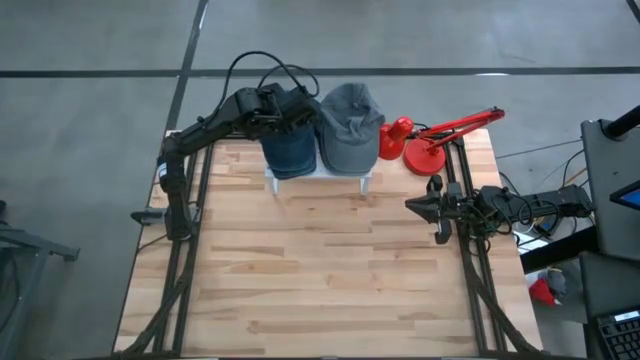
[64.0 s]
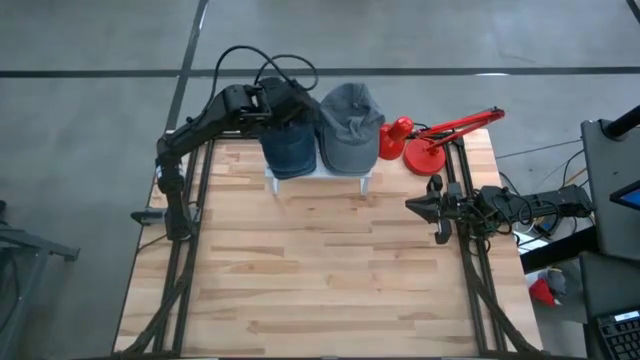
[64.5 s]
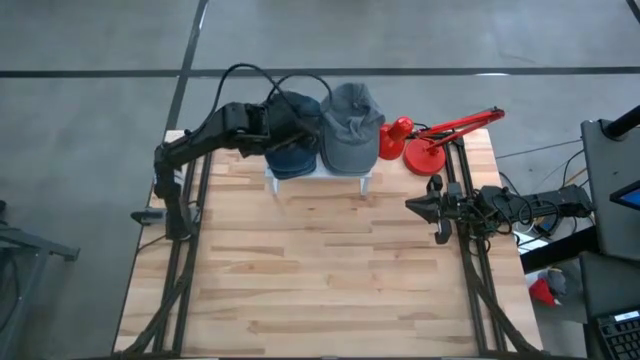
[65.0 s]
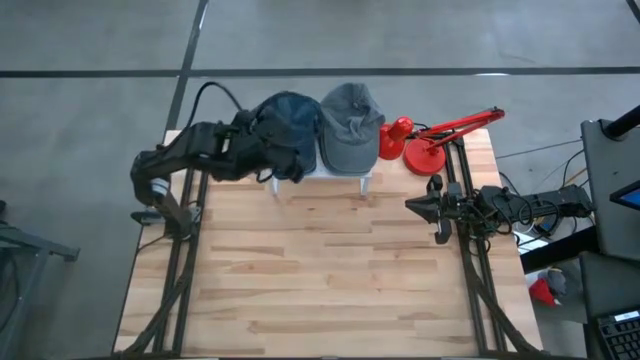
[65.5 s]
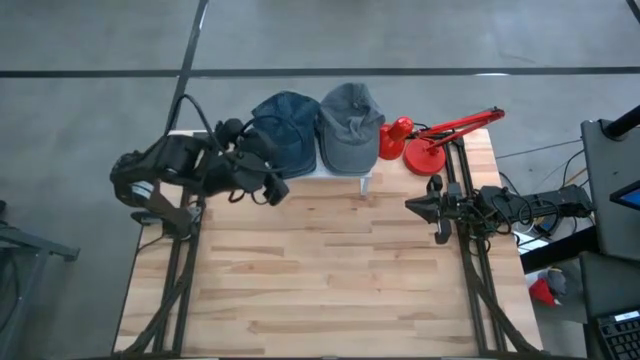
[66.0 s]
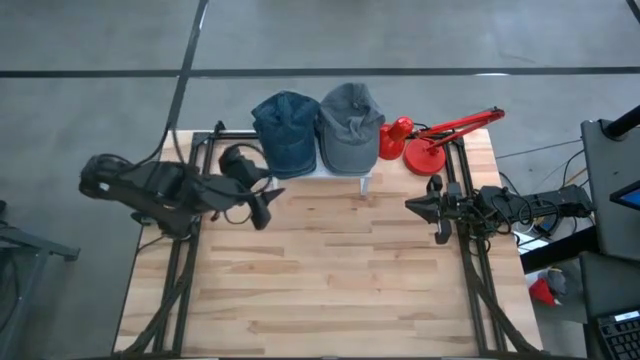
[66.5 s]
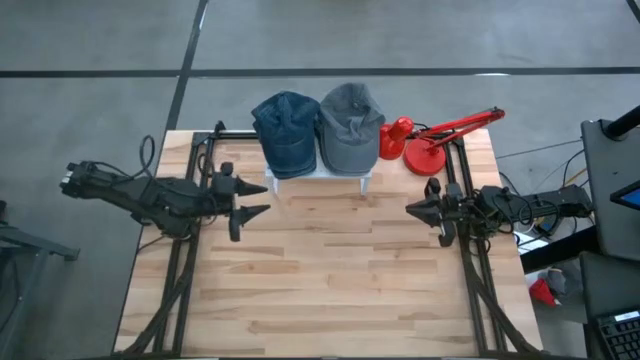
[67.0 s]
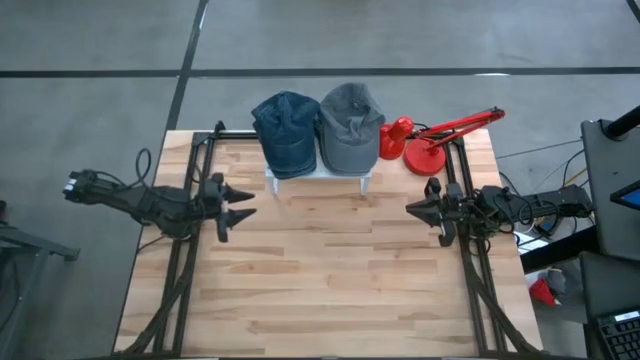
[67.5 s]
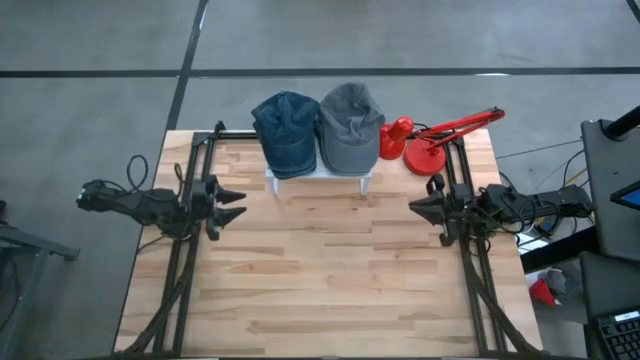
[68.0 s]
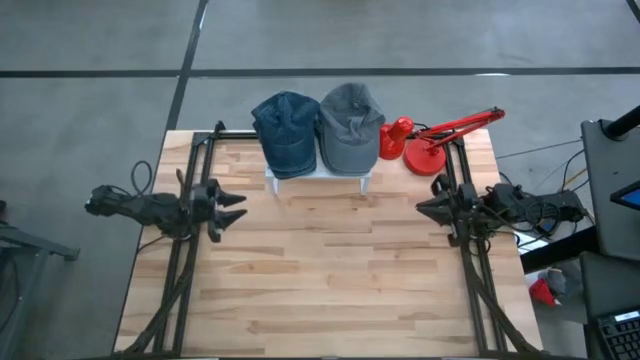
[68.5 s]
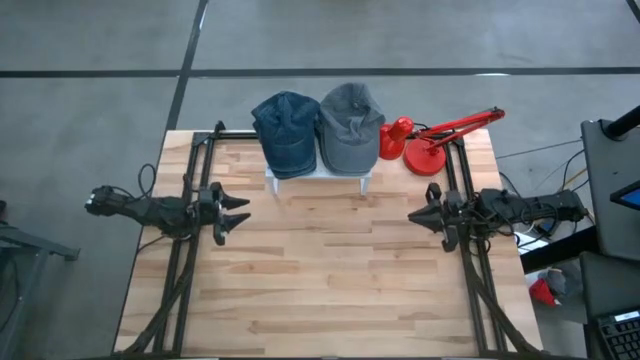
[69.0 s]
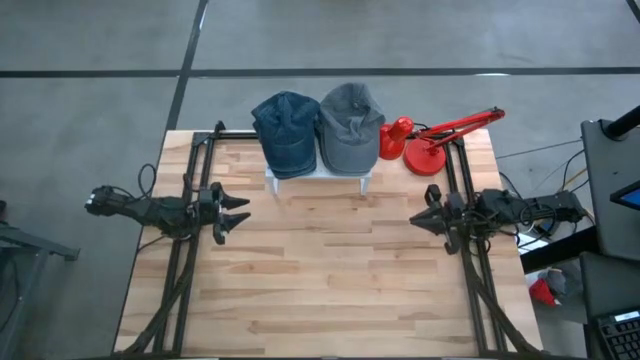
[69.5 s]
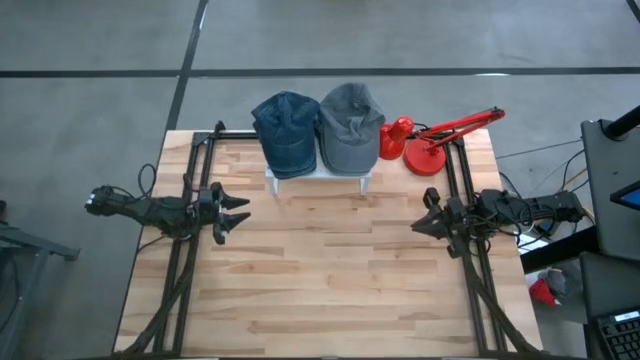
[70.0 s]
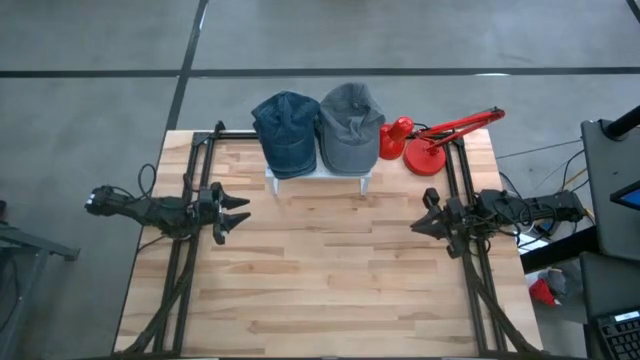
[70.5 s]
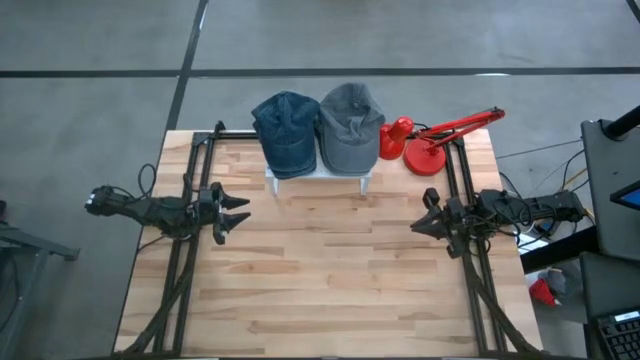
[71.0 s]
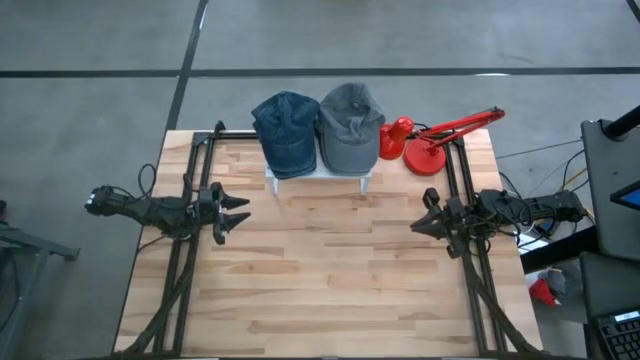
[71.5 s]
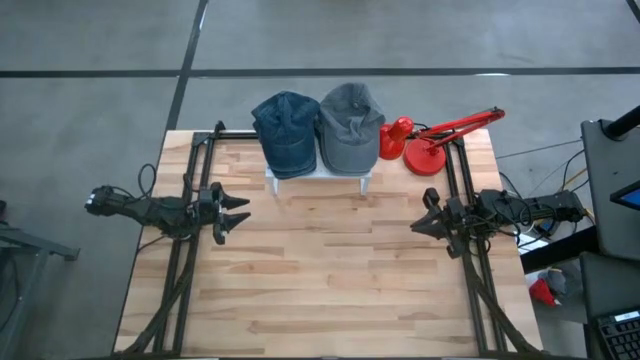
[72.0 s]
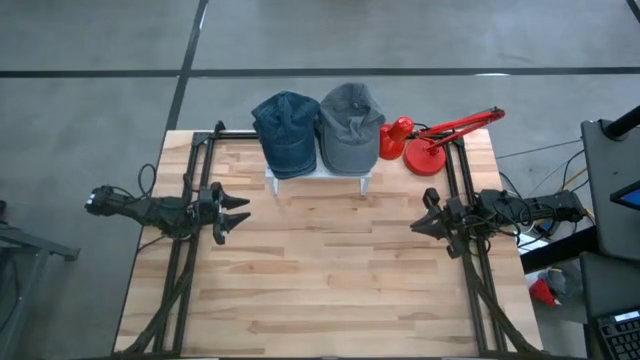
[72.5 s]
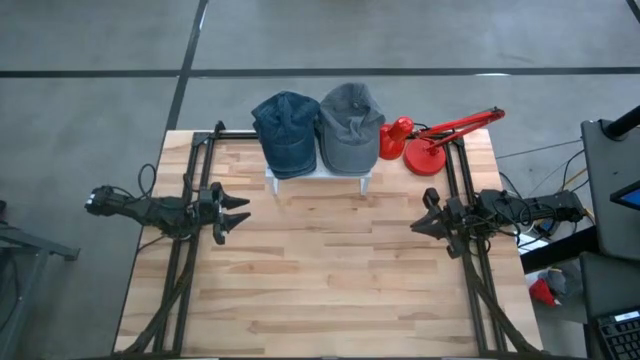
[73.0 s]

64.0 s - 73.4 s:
Task: Pick & Place hat
Return to Home Position

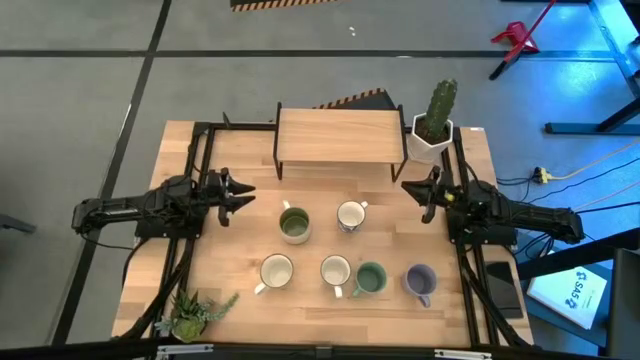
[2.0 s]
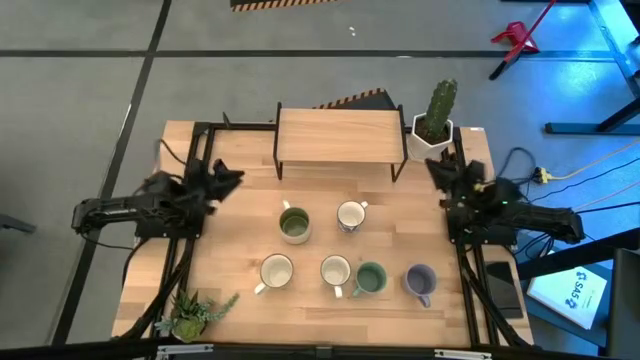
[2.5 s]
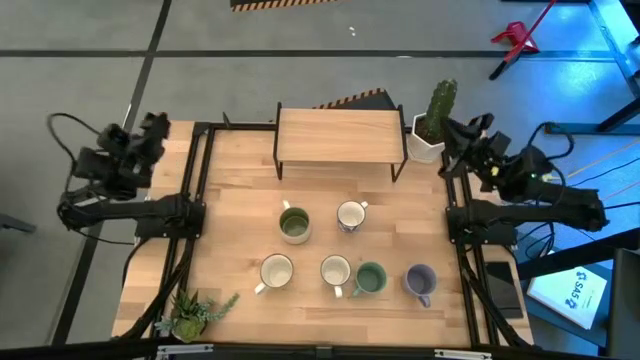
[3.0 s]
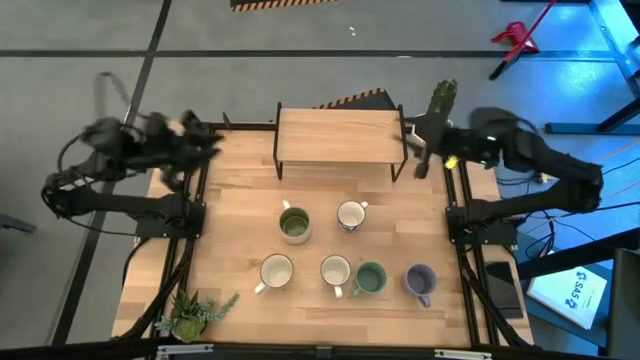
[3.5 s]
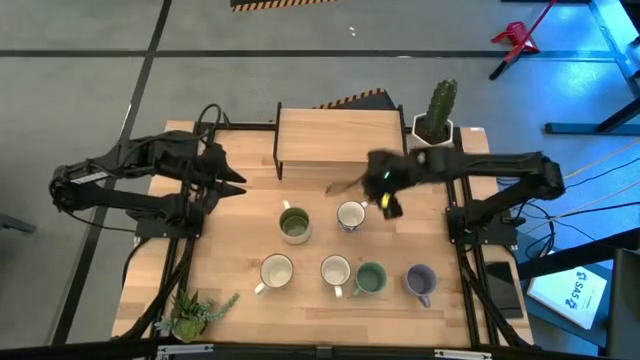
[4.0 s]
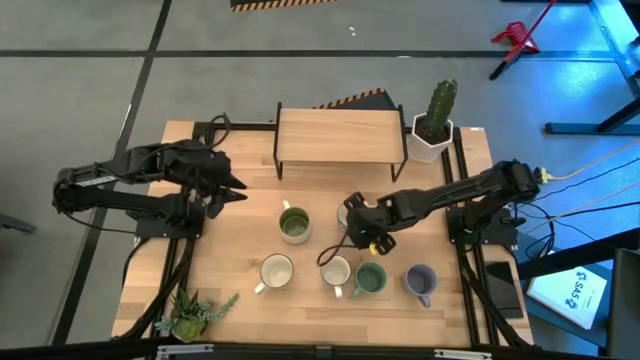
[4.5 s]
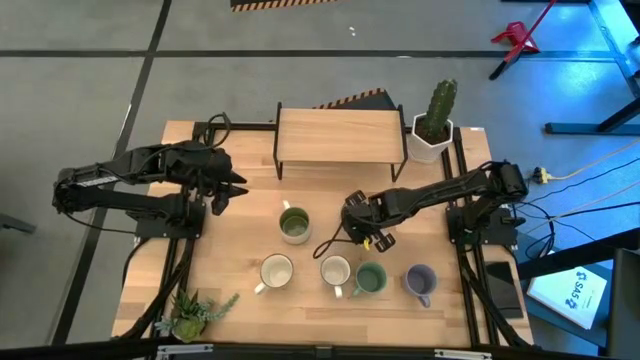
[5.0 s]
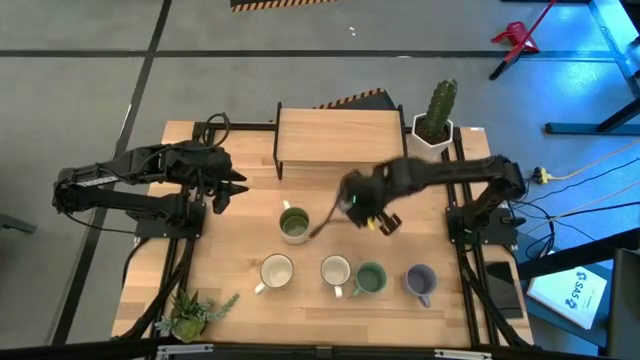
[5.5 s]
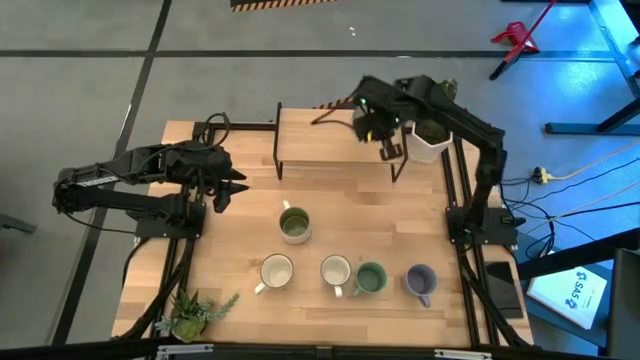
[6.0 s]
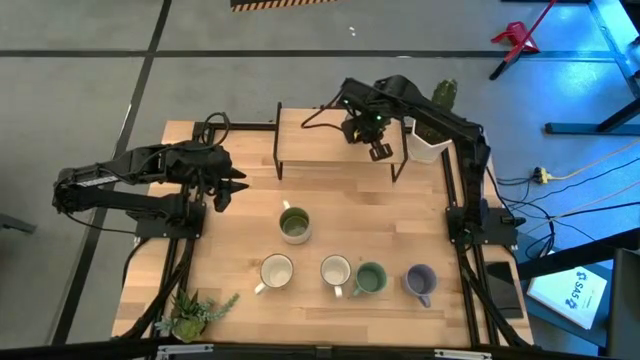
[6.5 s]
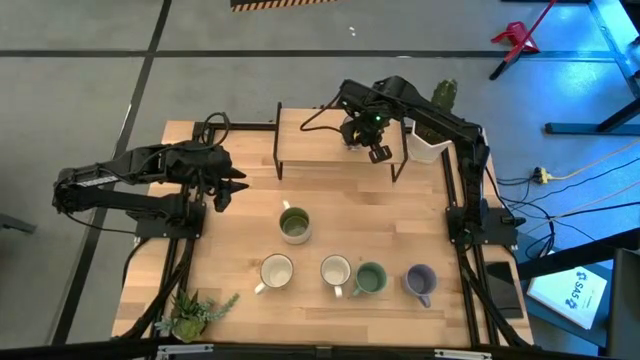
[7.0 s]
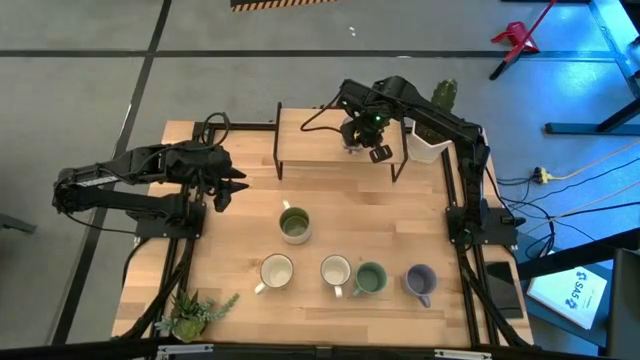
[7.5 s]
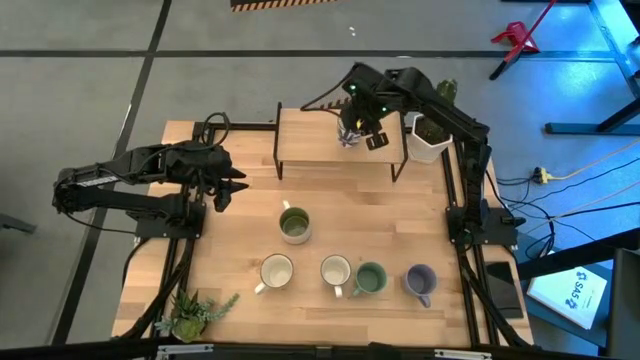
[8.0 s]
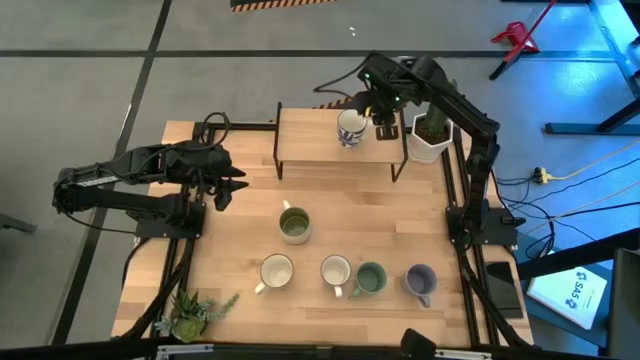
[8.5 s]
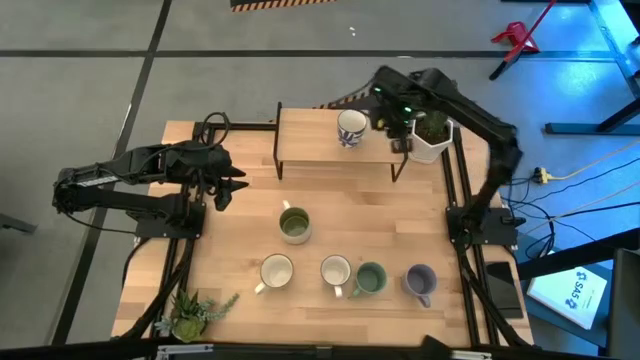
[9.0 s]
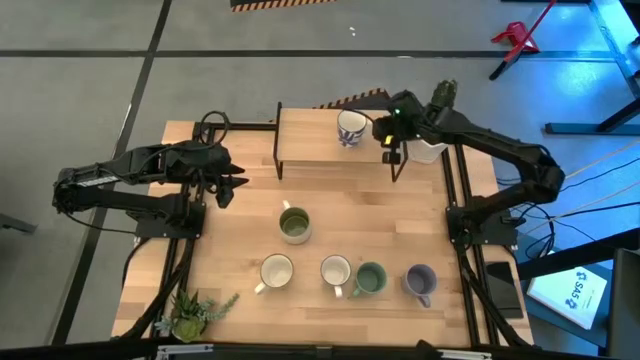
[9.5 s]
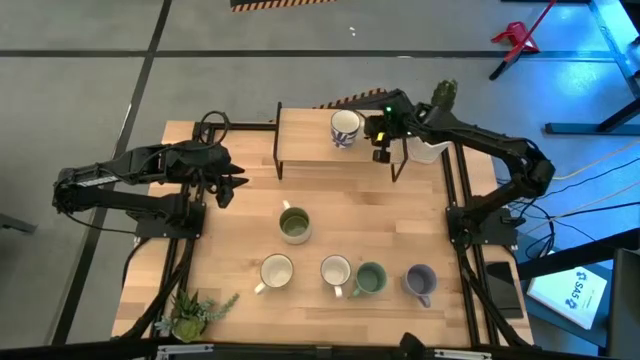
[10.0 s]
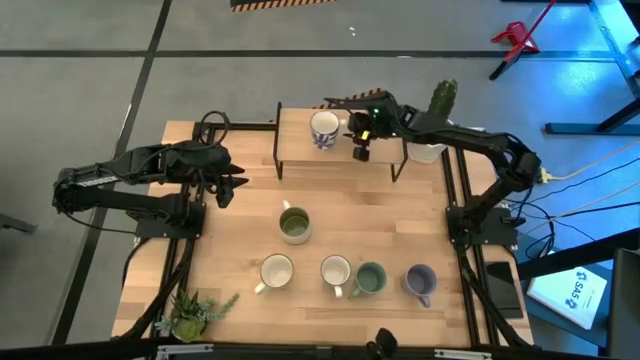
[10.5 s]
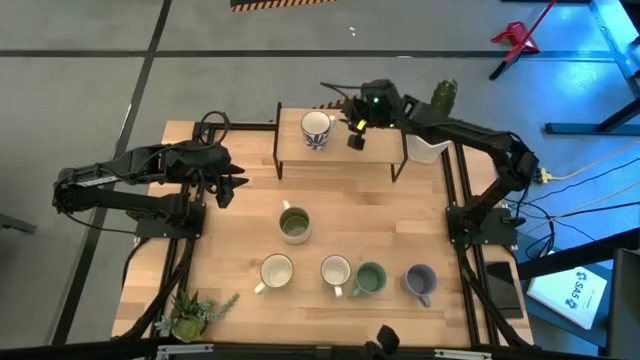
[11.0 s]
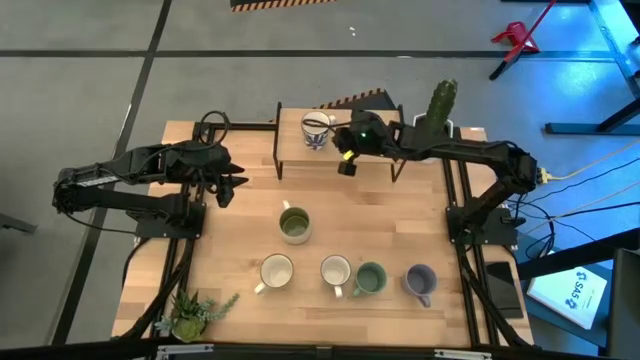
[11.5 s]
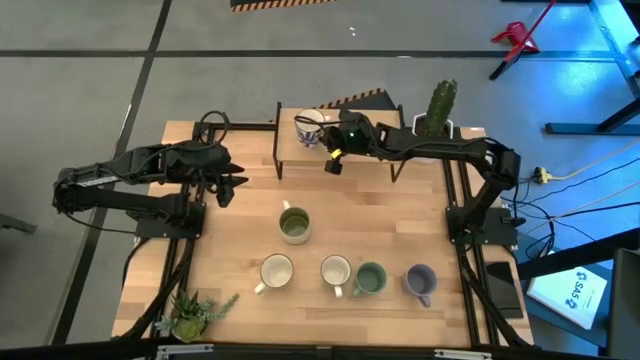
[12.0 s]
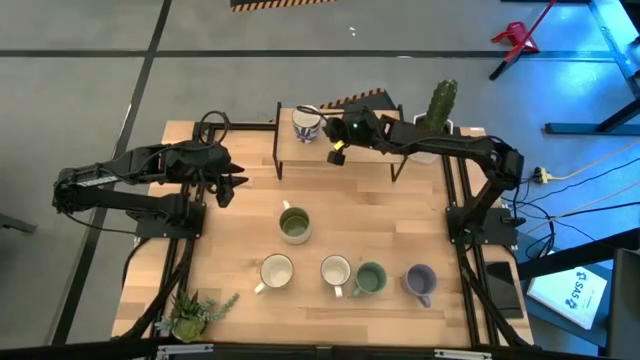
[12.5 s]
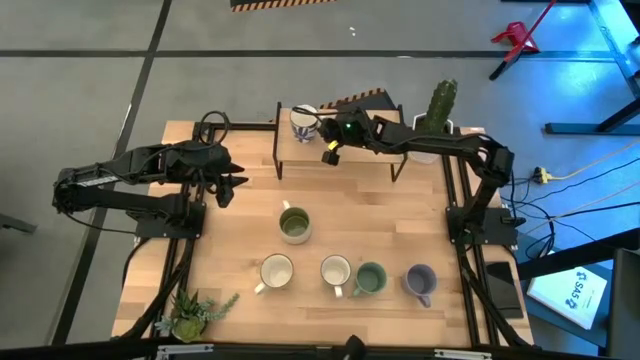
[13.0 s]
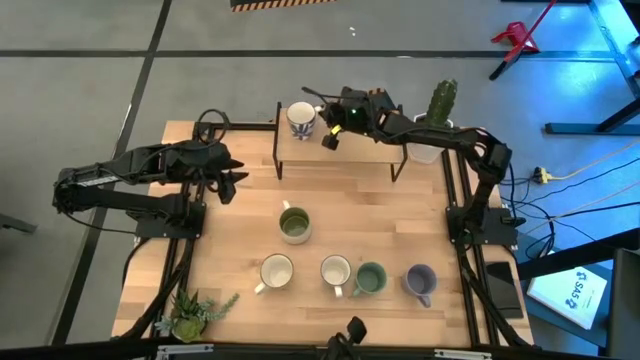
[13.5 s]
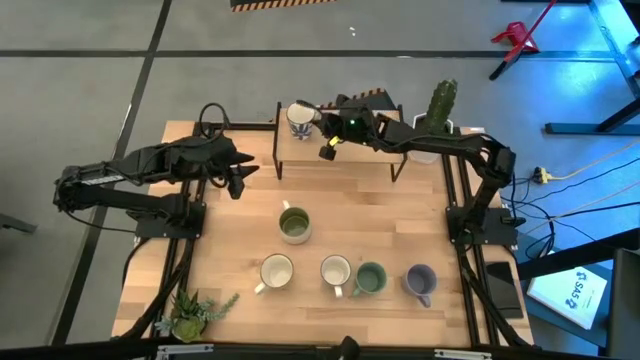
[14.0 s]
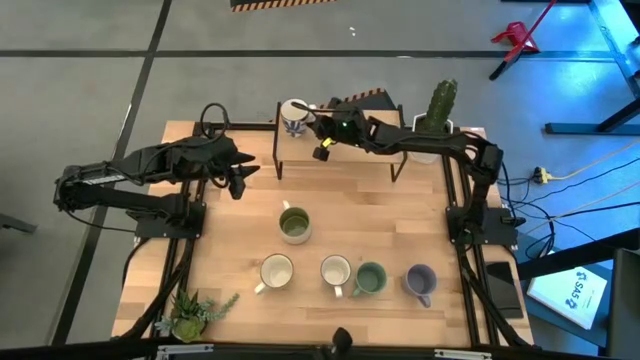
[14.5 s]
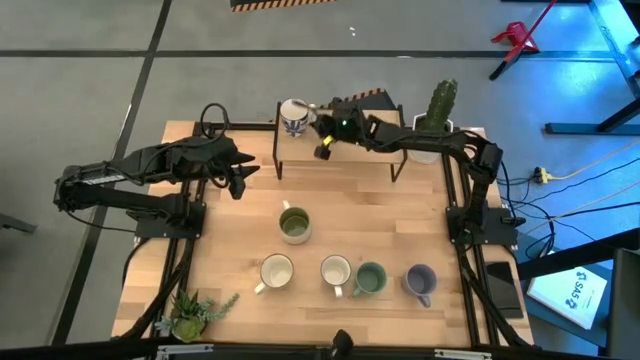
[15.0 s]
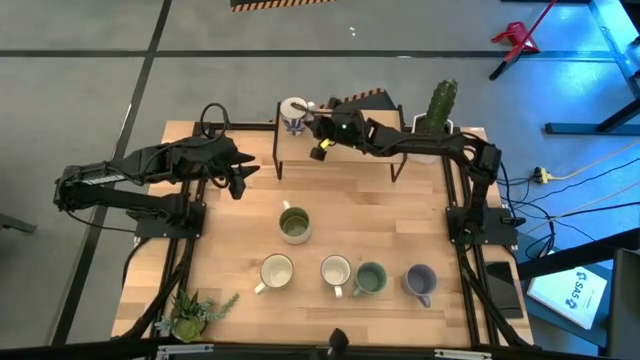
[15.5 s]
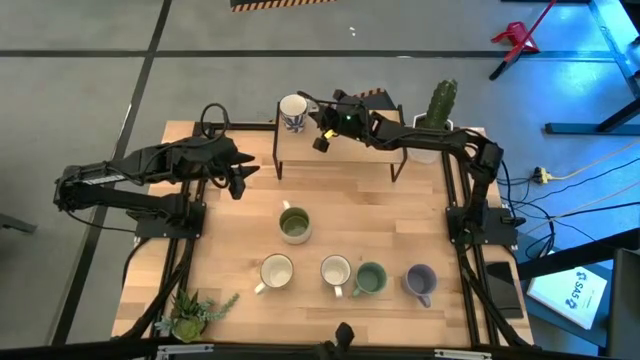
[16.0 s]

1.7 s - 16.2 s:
Task: Place coffee mugs
Put the top blue patterned mug on the shelf
